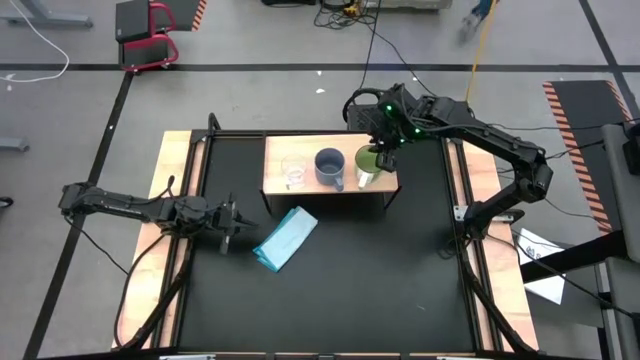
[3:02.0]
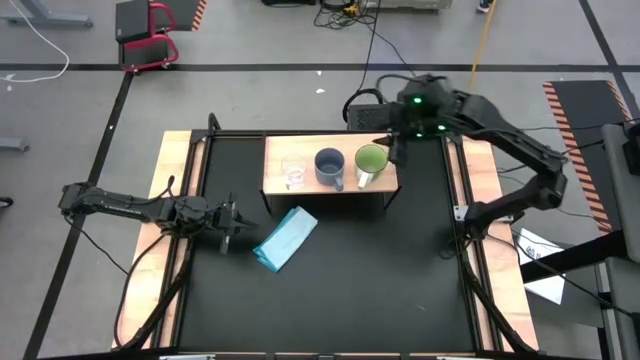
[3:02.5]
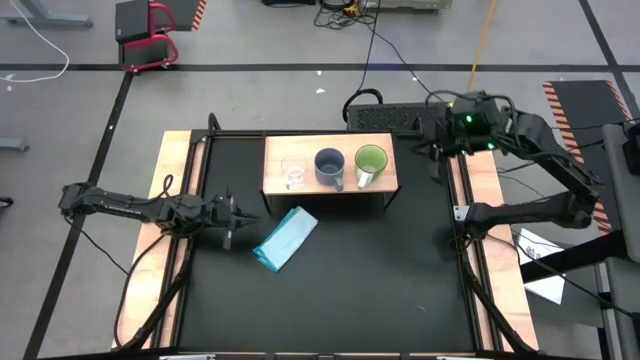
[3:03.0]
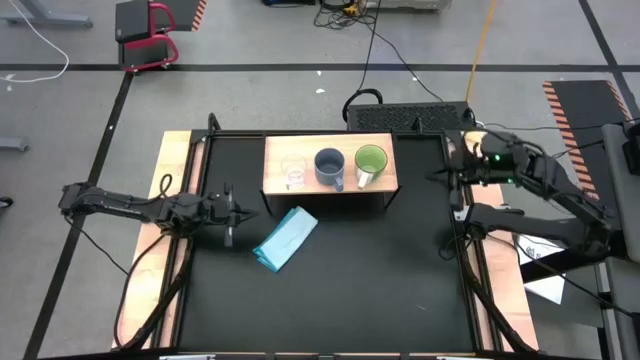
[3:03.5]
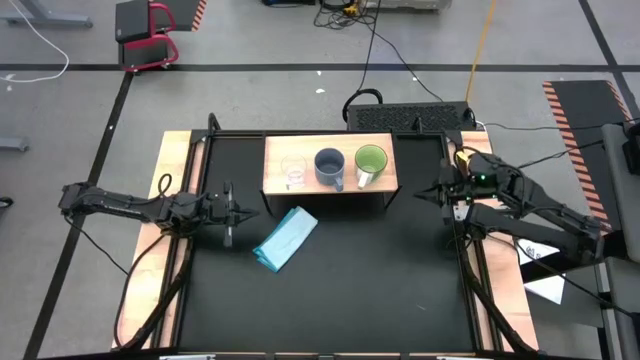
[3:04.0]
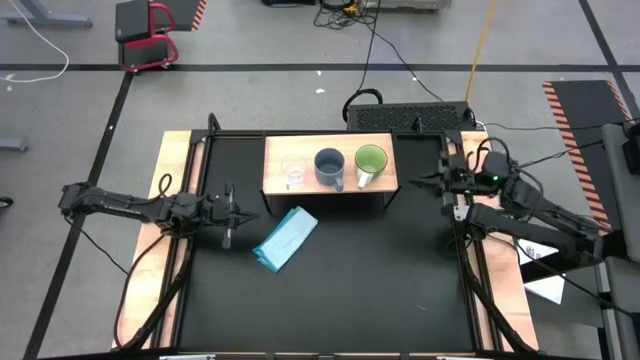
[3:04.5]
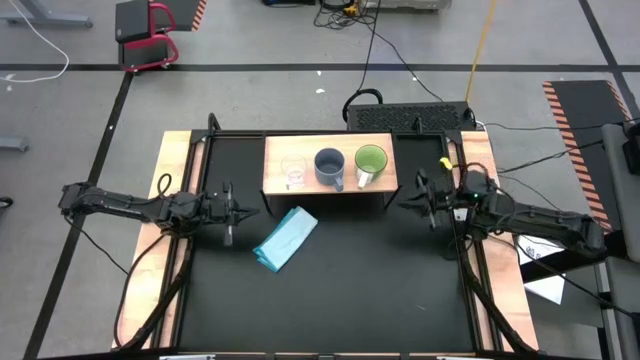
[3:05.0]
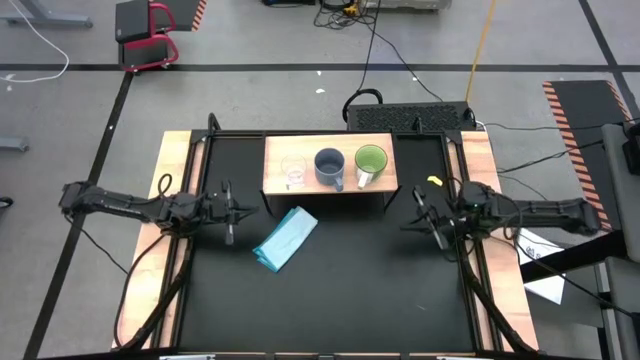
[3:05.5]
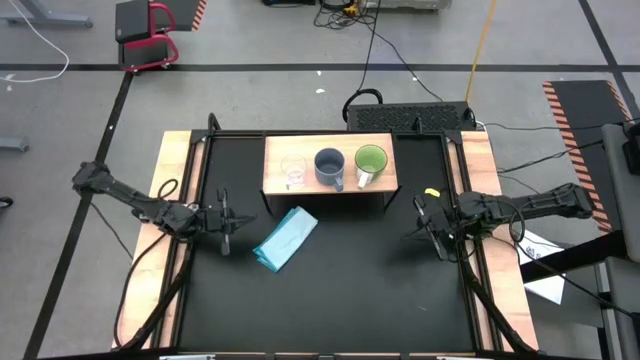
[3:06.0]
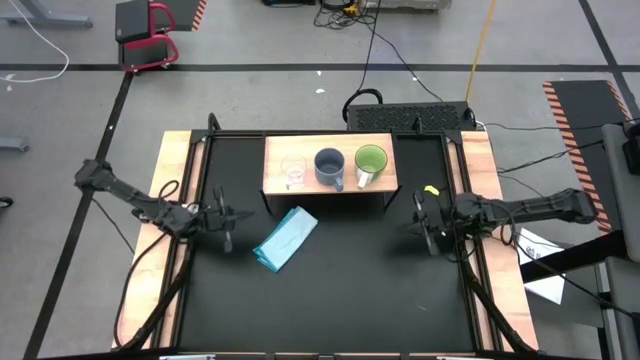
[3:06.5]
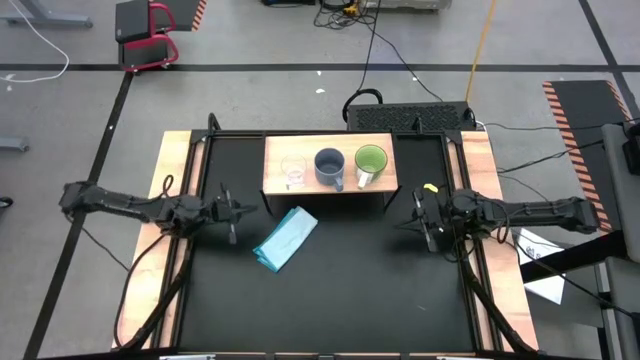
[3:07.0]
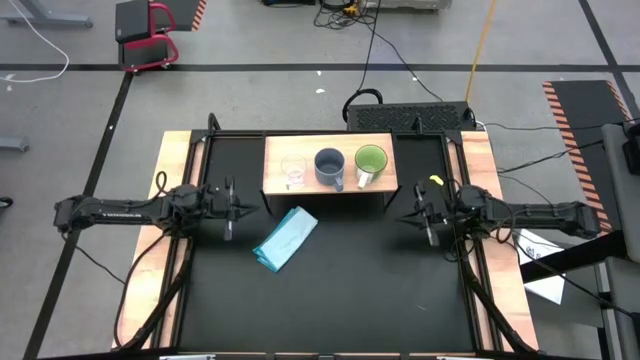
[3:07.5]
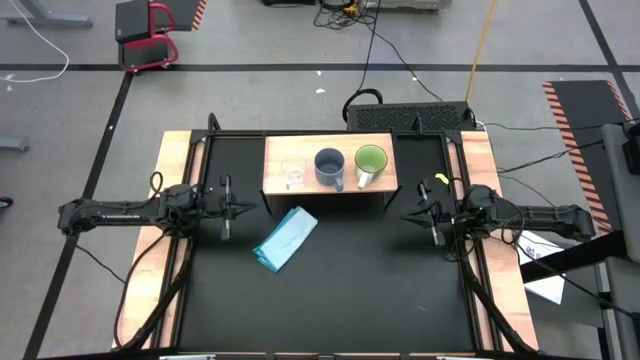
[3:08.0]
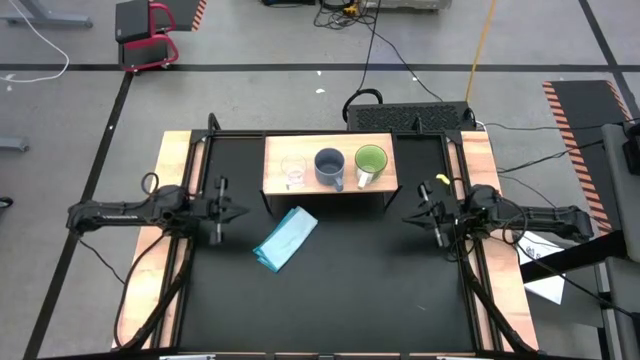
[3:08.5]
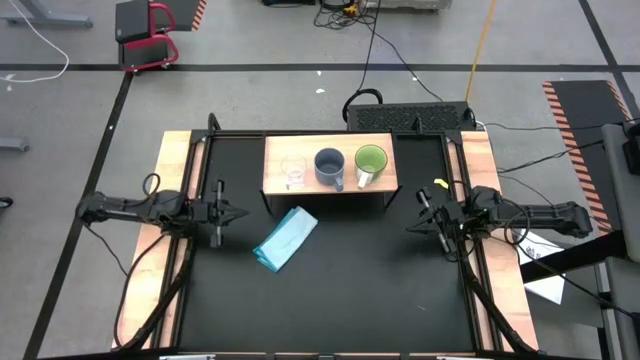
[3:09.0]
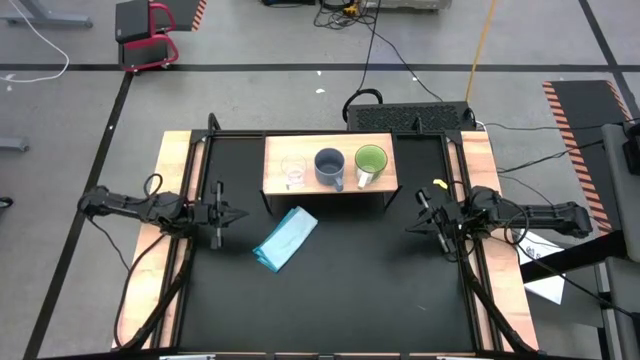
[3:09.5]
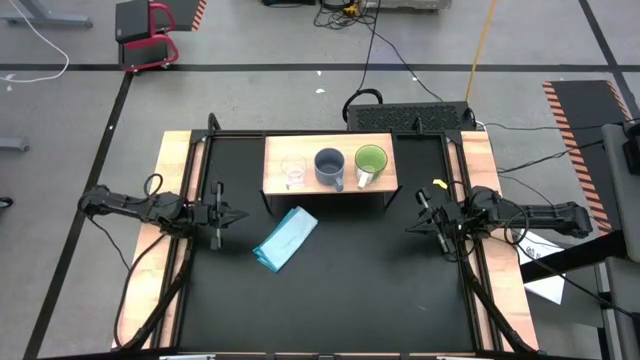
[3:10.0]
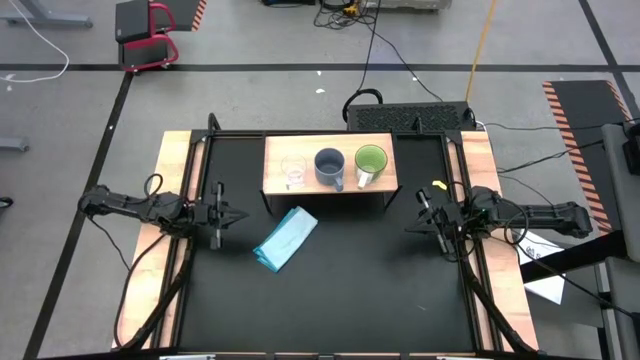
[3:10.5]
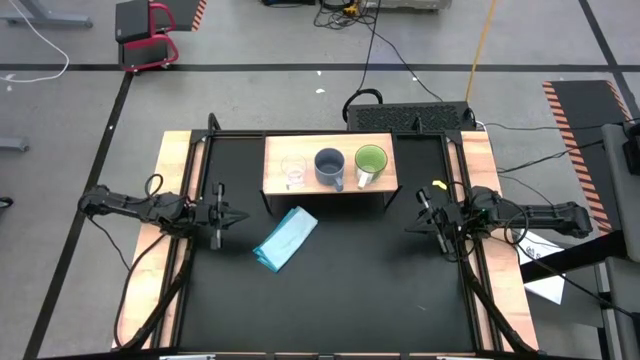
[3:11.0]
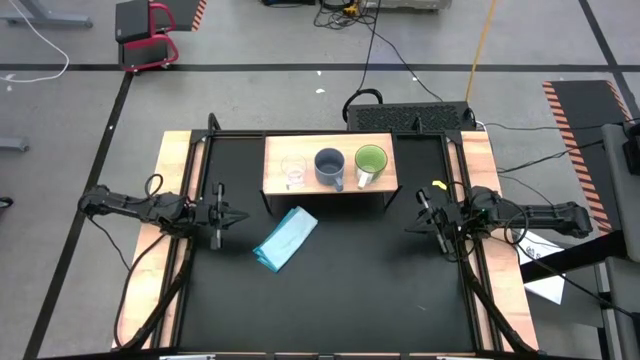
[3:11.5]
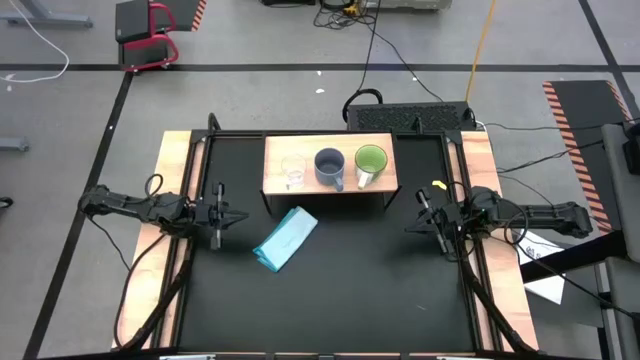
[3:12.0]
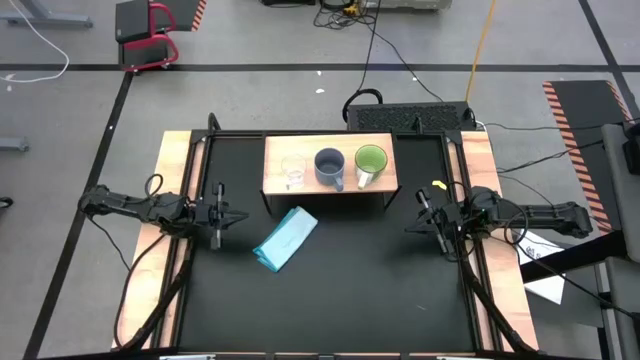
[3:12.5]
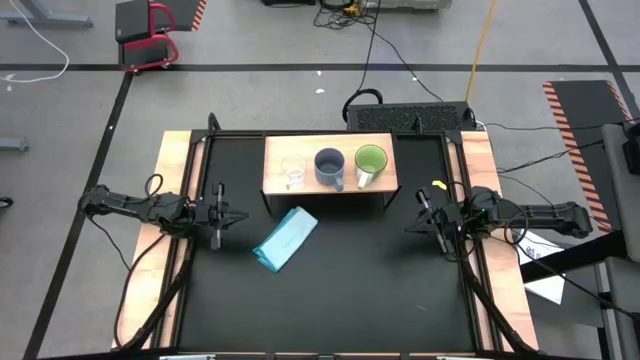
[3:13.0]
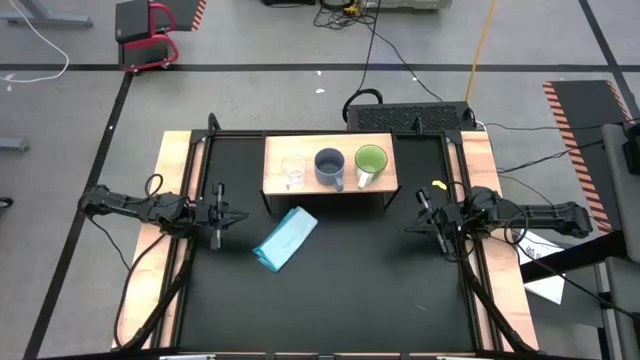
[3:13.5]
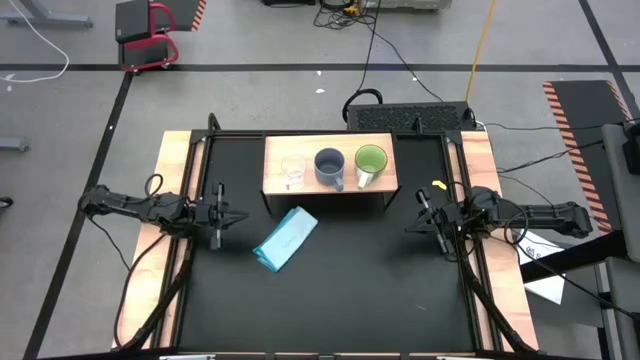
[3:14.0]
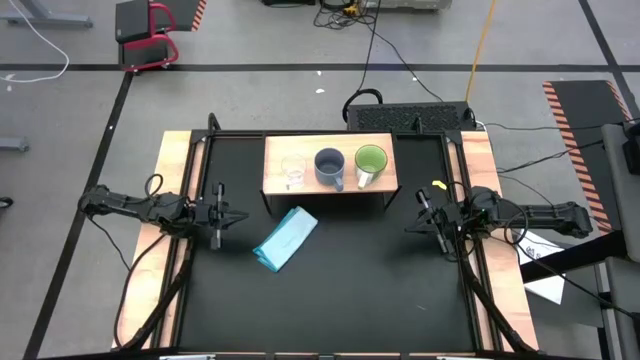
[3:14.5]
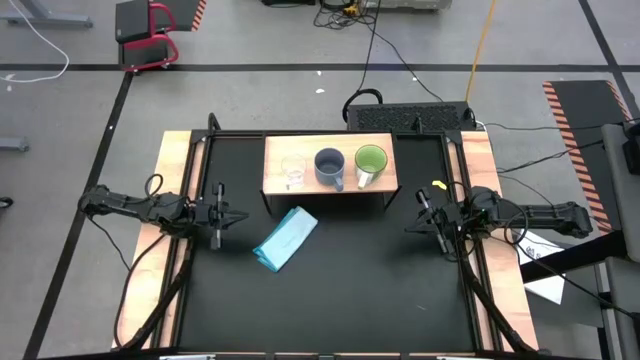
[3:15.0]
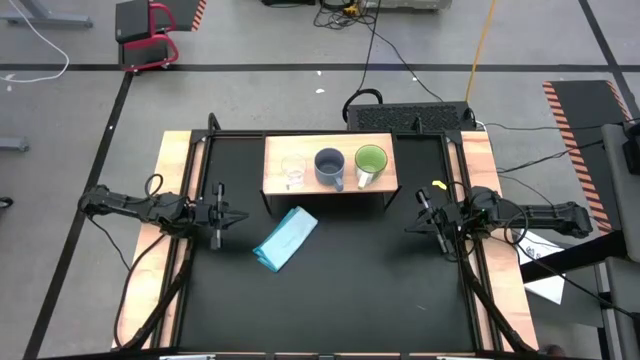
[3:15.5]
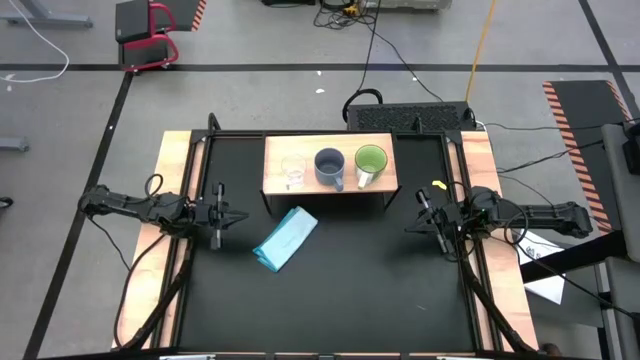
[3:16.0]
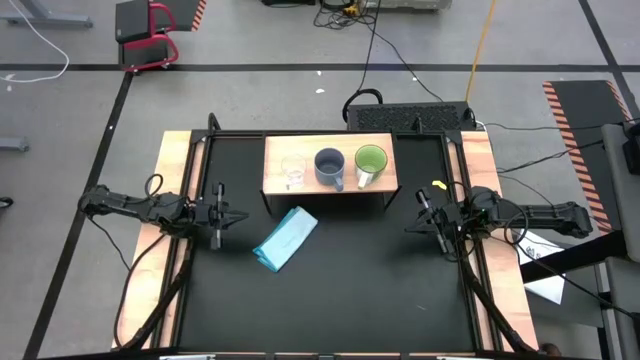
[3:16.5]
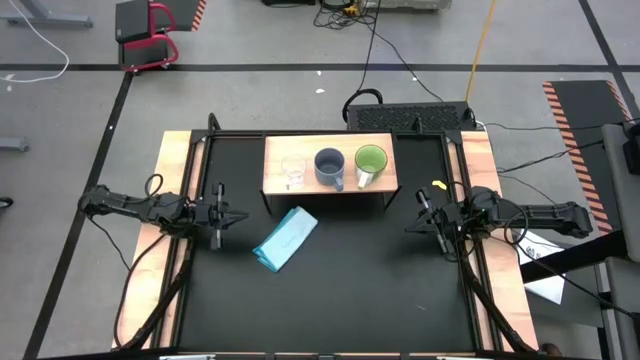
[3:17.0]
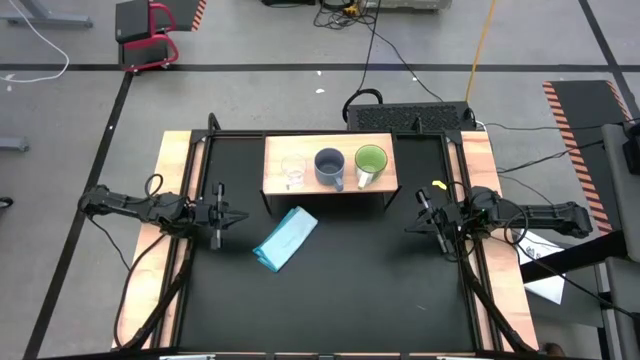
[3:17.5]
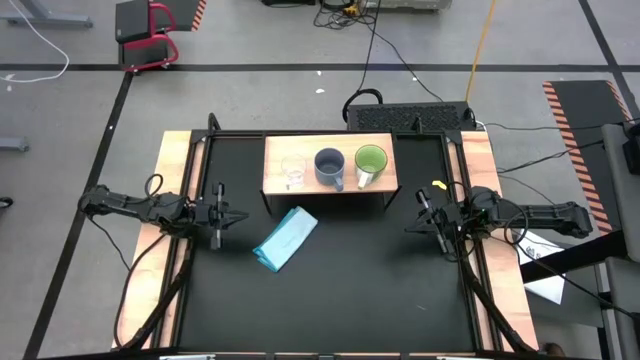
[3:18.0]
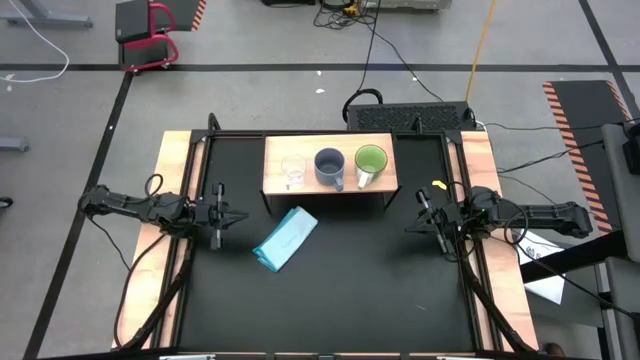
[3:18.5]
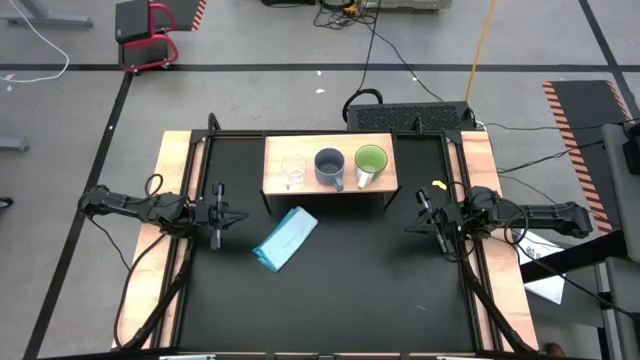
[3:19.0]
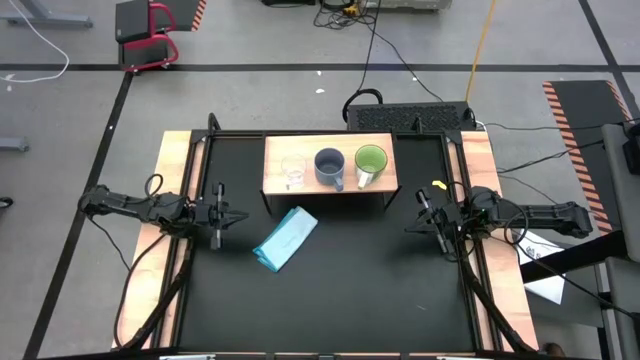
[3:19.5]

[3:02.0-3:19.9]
Task: Stack small to large cups/mugs on shelf
Return to Home Position

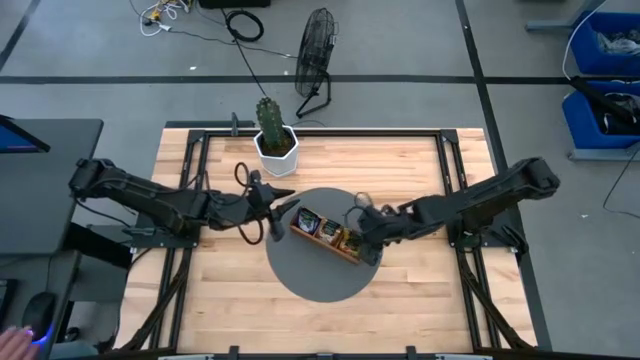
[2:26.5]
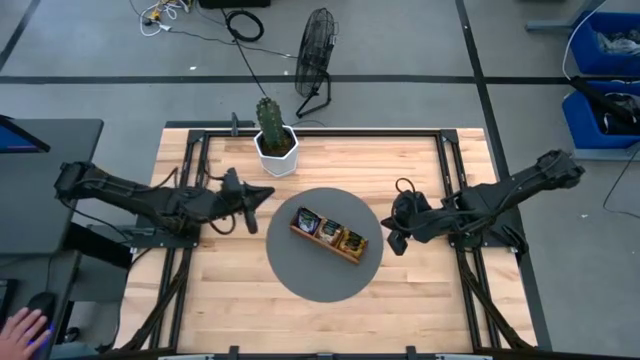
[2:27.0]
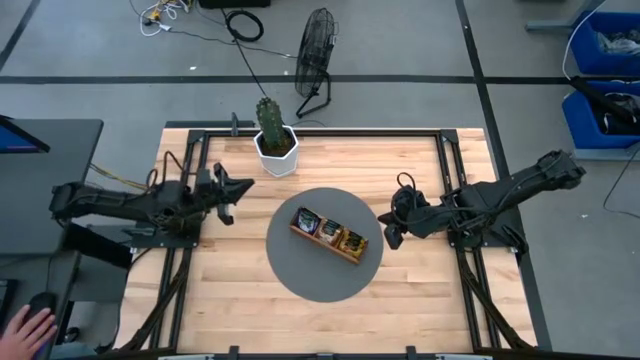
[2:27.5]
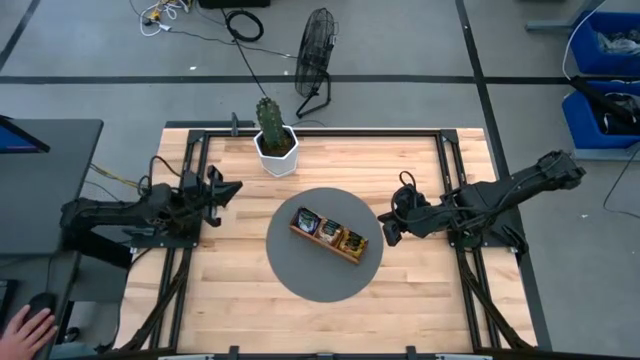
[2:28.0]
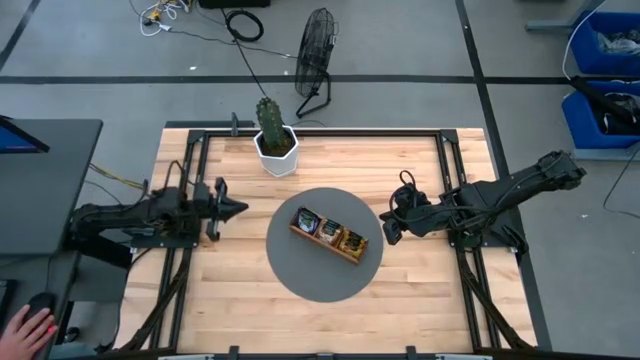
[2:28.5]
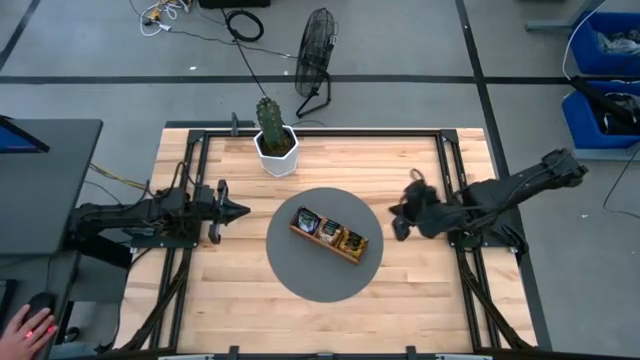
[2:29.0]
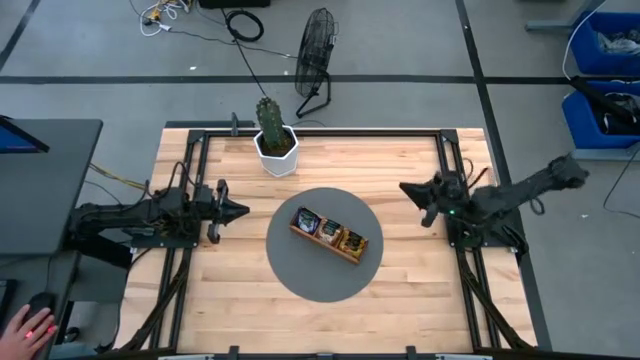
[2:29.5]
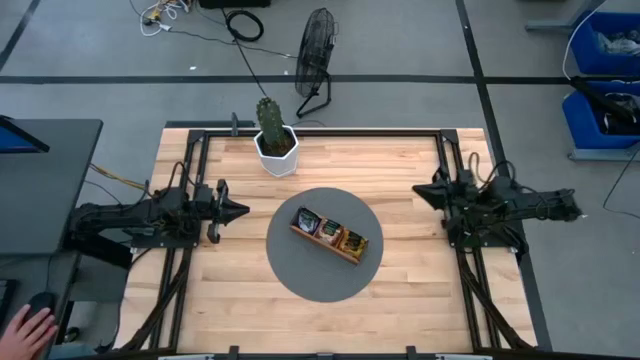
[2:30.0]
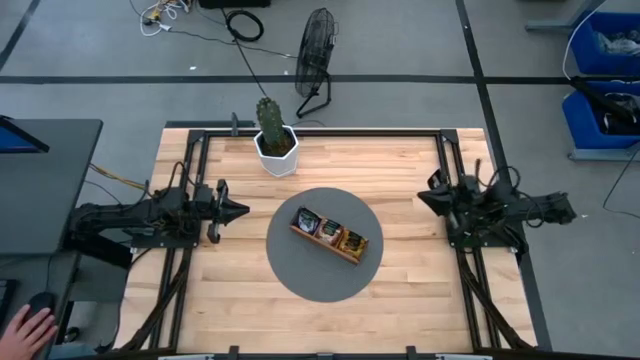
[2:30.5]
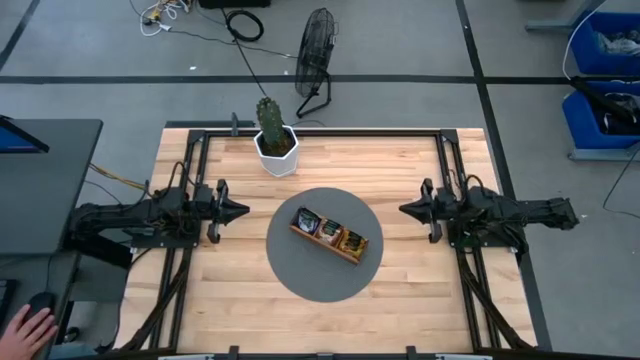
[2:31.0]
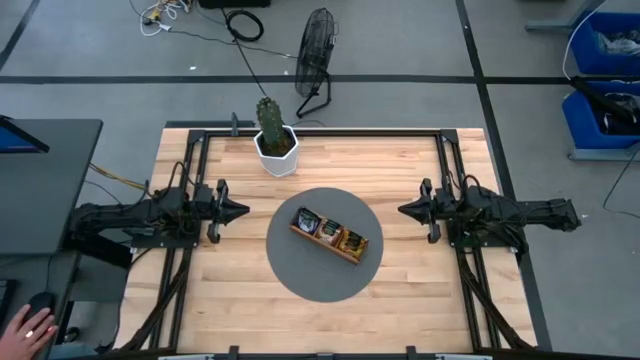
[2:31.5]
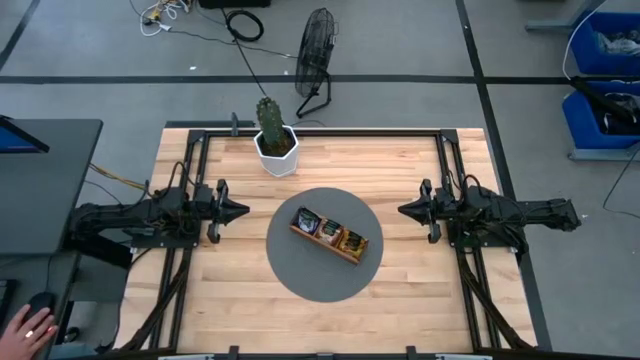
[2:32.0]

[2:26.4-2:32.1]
Task: Pick & Place Tea
Return to Home Position
